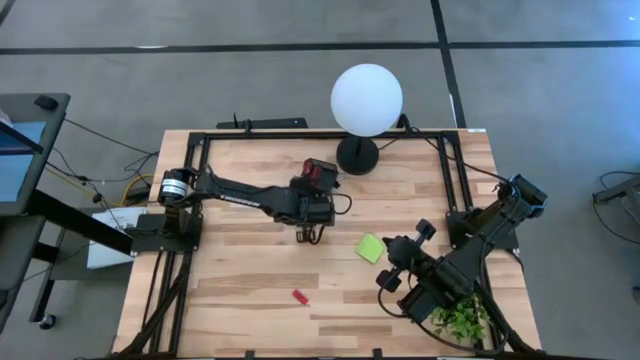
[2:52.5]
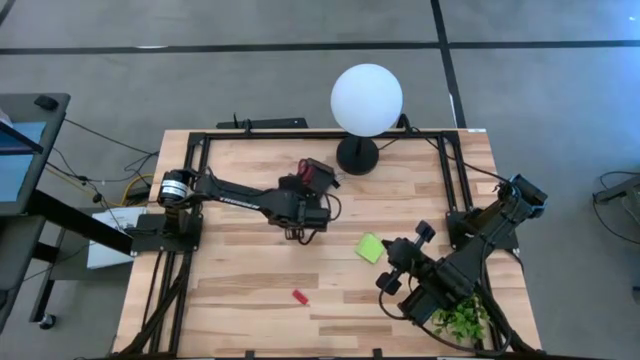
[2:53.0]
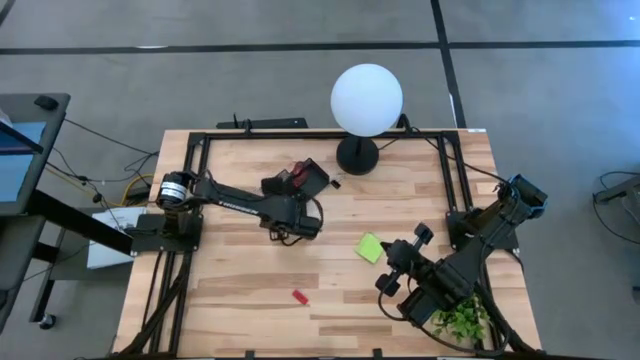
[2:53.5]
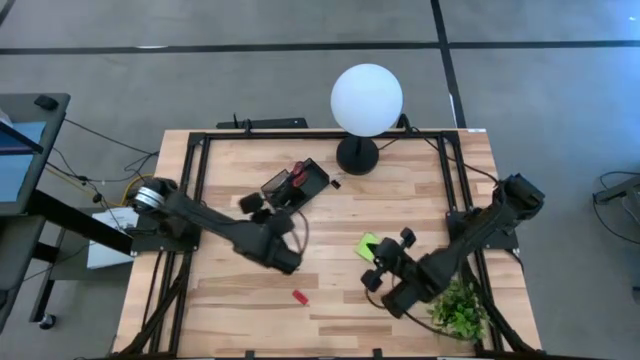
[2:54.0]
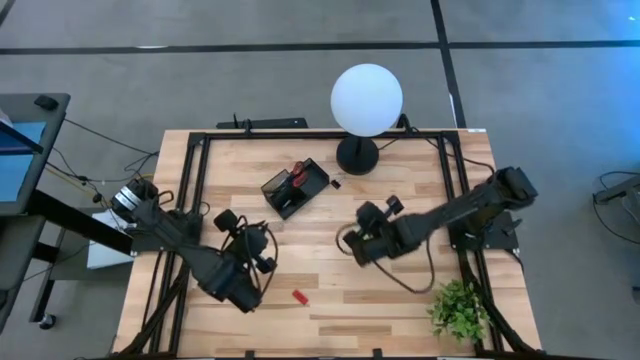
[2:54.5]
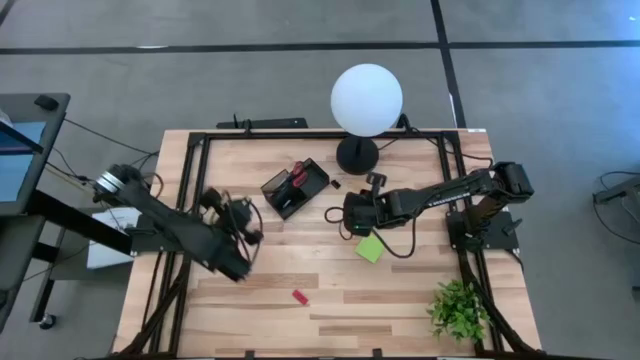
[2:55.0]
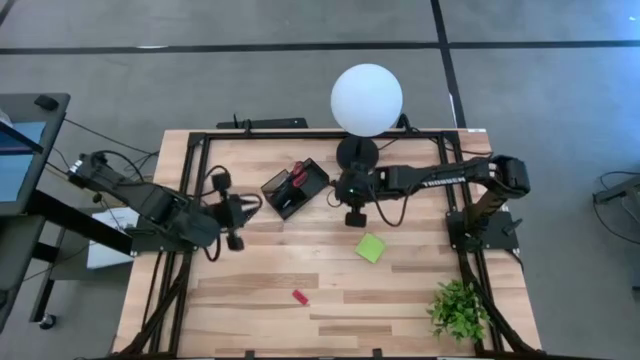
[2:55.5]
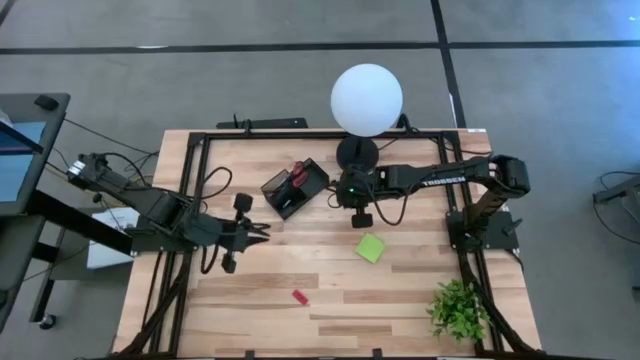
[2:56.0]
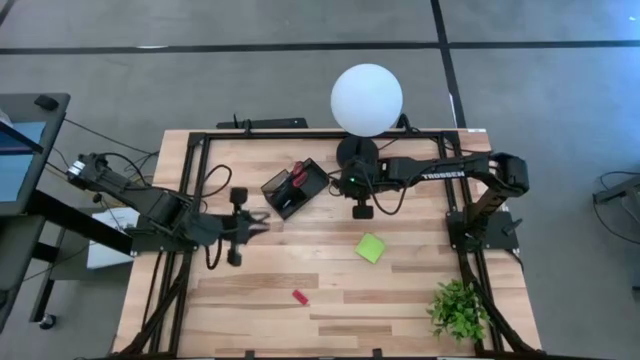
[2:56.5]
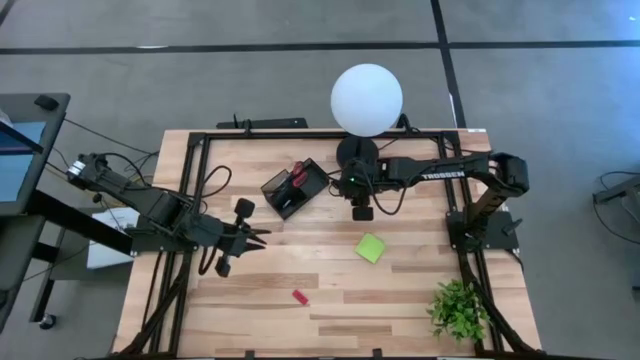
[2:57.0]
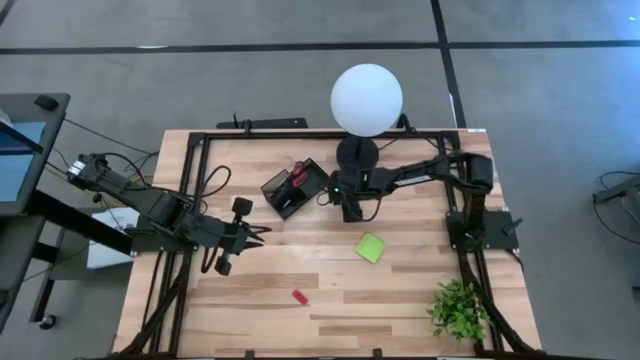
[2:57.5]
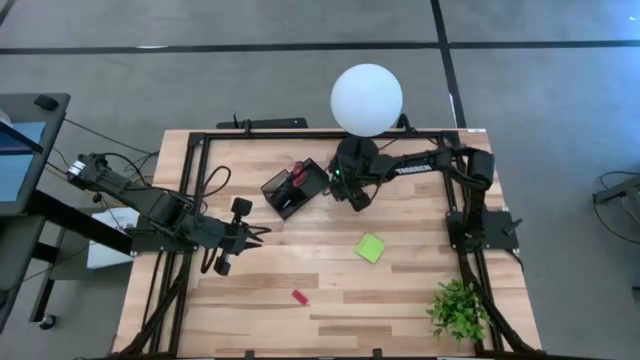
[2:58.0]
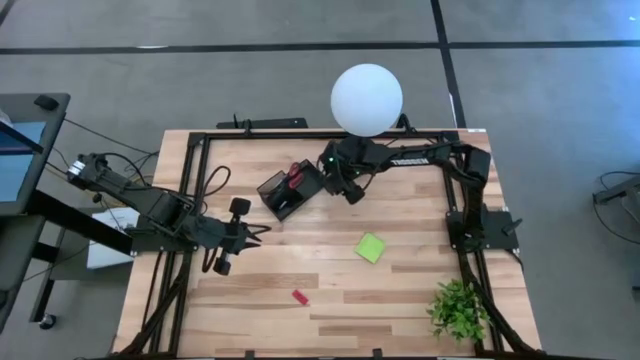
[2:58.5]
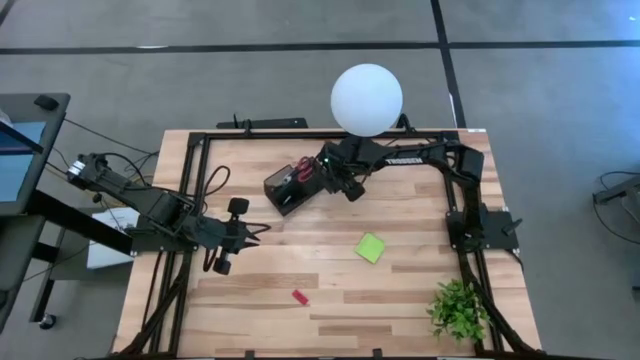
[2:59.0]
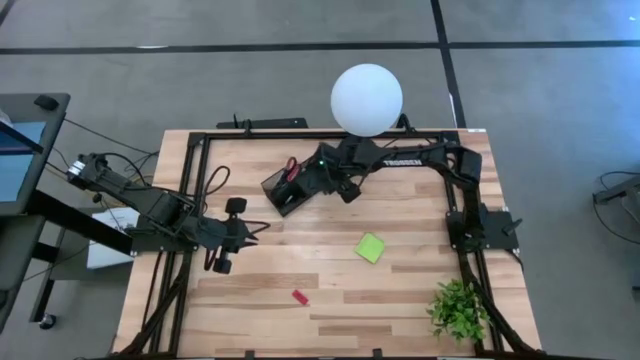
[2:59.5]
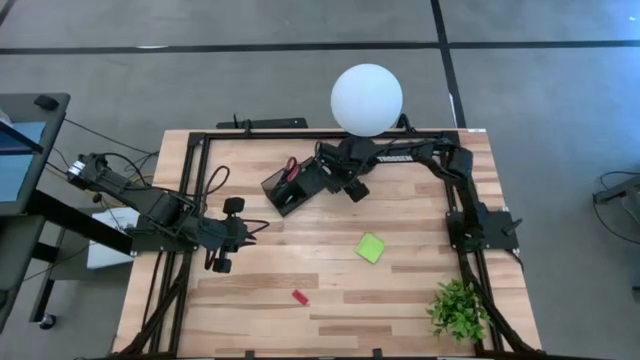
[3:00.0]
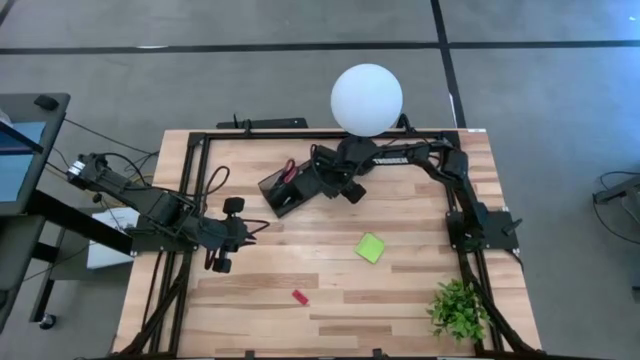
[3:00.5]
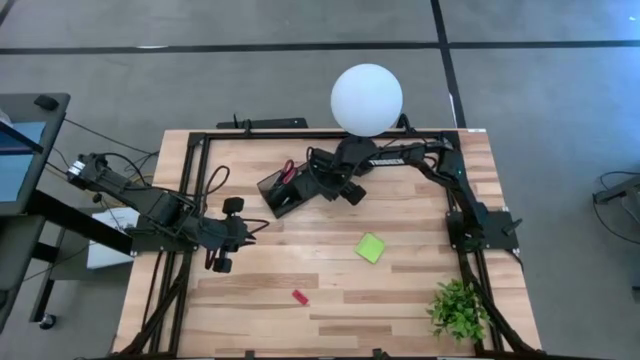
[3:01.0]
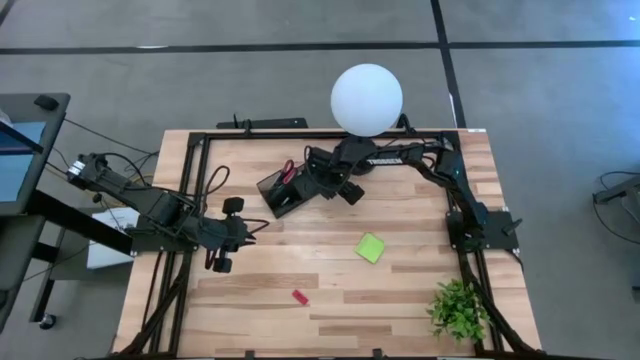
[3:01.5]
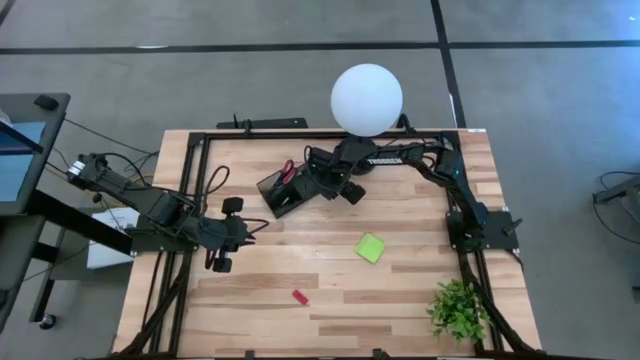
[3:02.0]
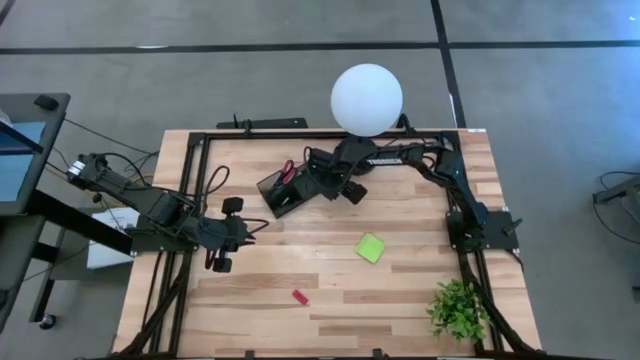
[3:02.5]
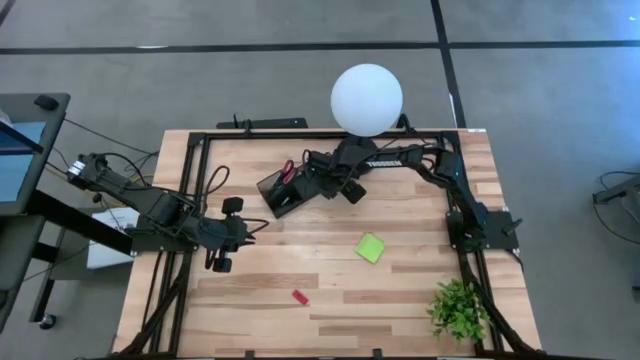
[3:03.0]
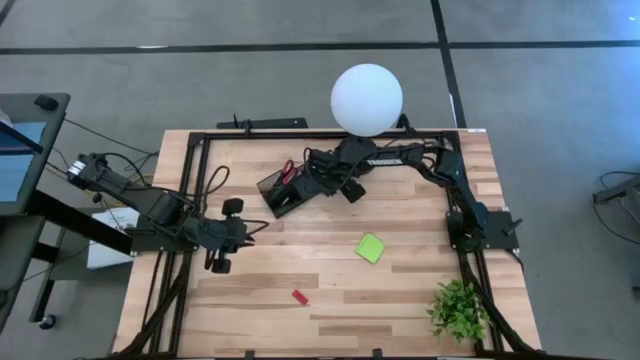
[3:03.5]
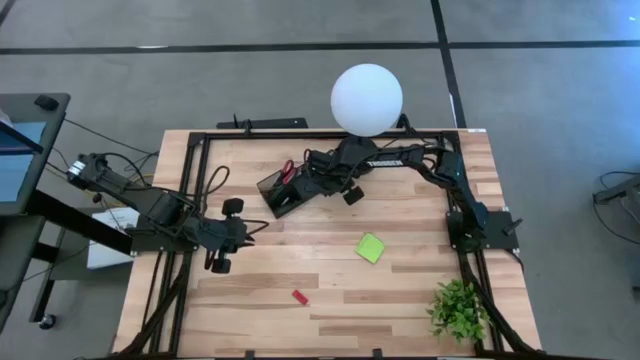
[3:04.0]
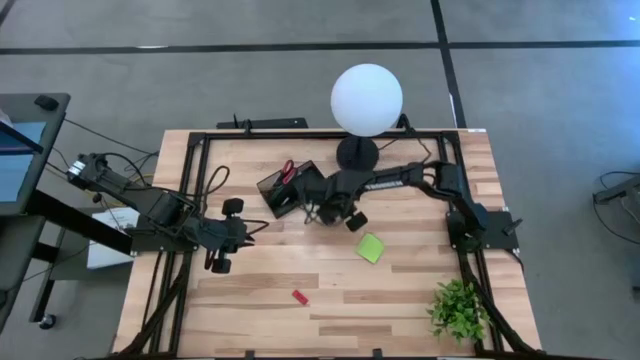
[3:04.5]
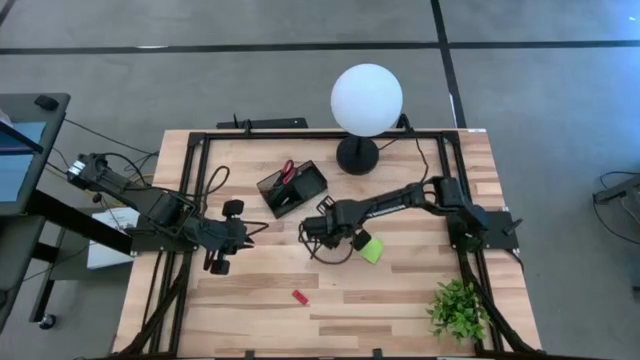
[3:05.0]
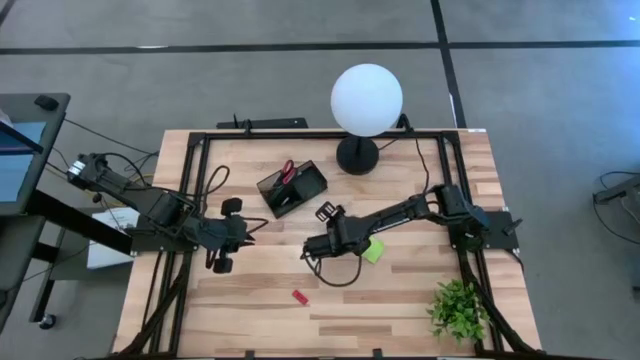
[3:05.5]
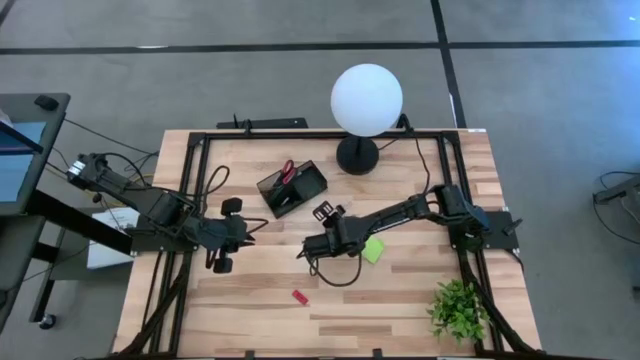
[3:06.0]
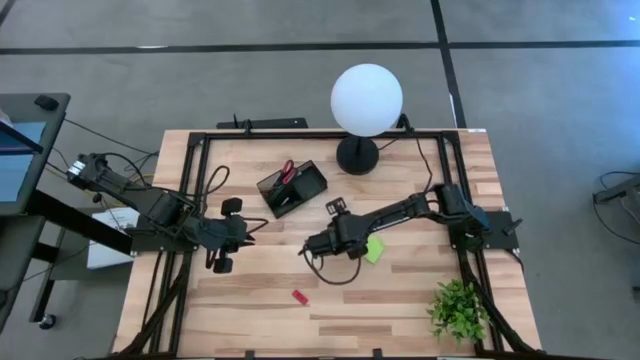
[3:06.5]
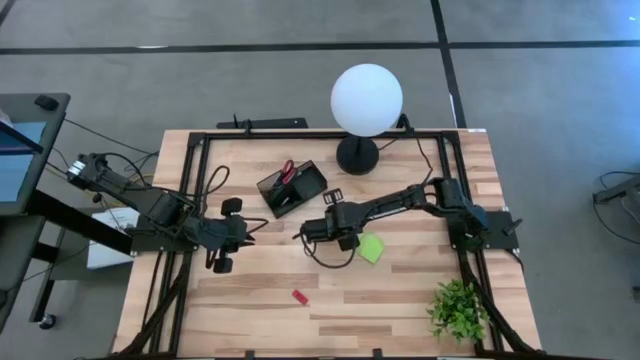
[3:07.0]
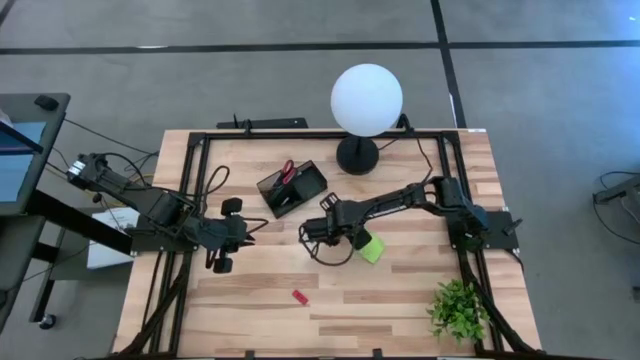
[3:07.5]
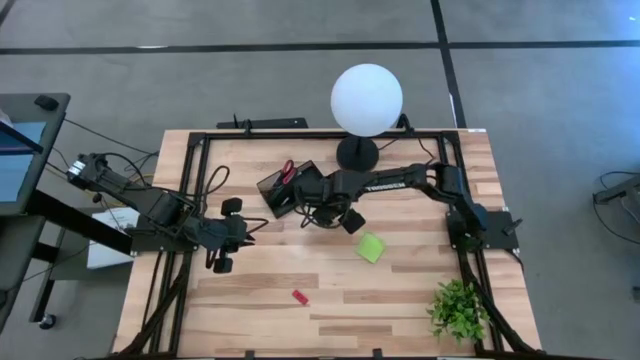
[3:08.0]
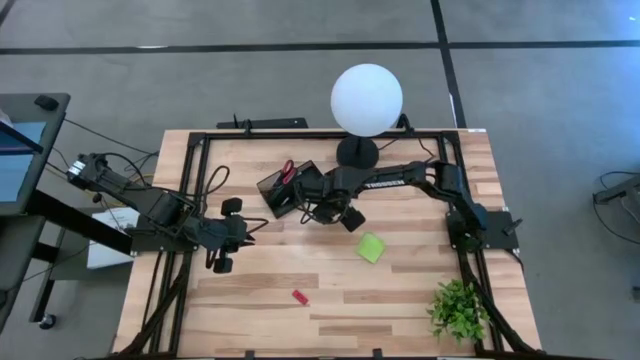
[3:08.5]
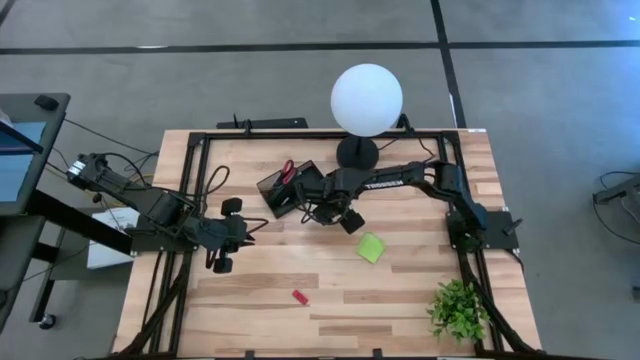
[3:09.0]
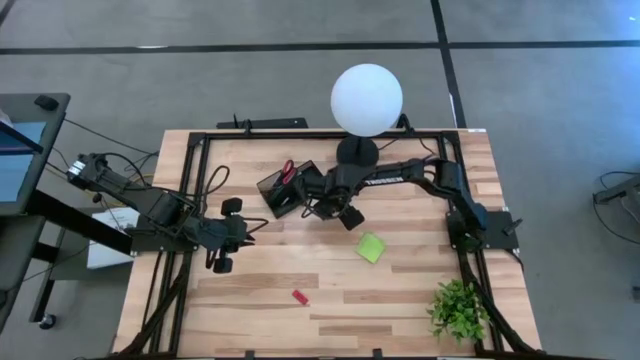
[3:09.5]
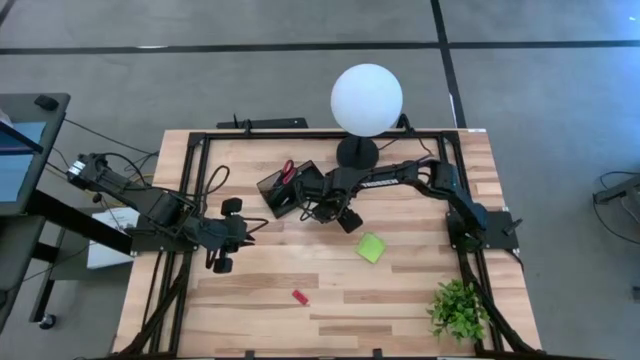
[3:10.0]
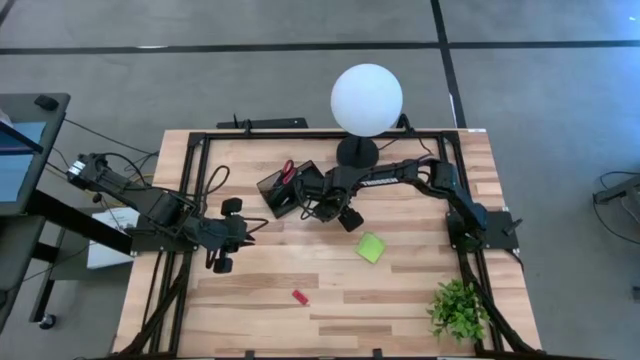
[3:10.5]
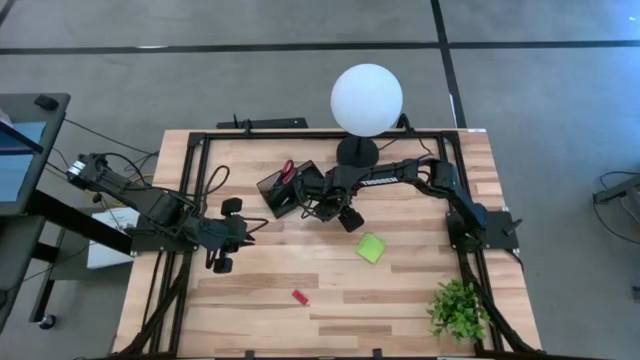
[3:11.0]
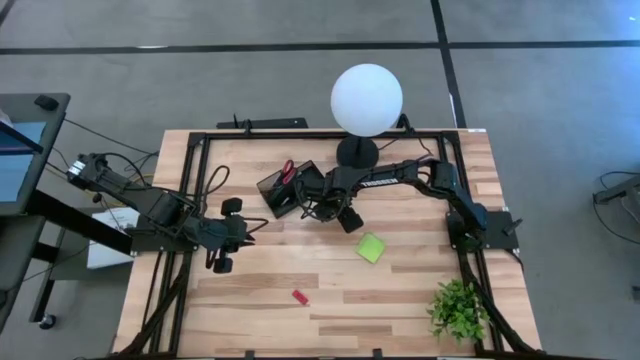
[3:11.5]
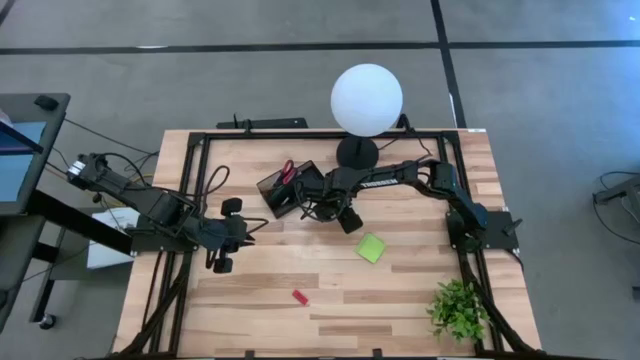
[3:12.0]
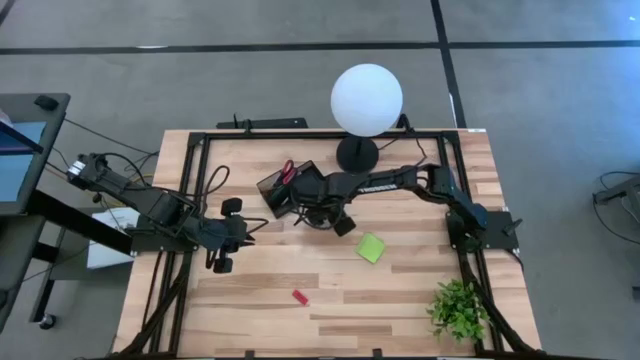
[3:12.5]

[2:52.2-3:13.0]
Task: Pick and place office supplies into organizer
Put the black binder clip into the black desk organizer
